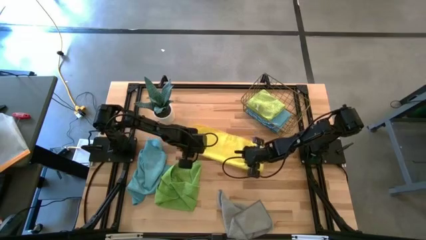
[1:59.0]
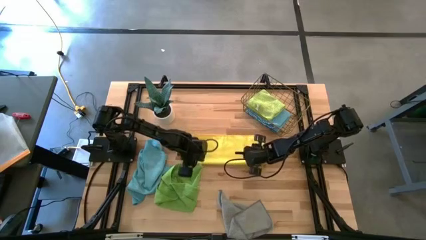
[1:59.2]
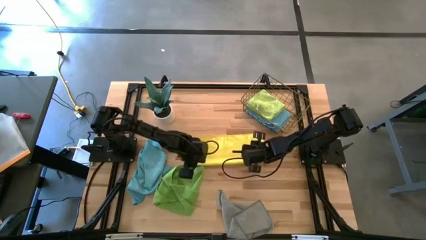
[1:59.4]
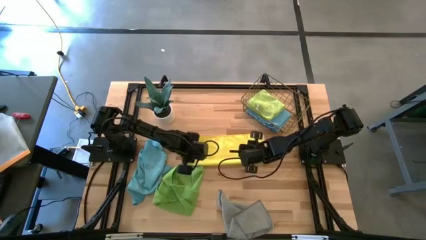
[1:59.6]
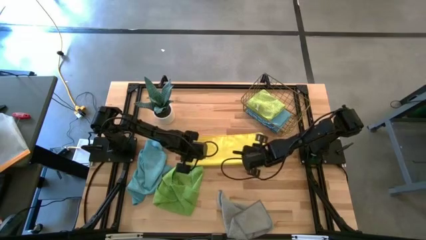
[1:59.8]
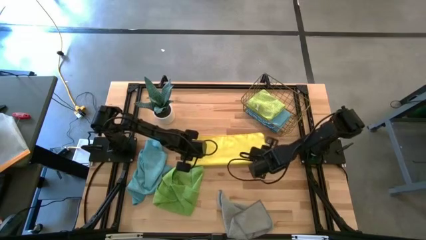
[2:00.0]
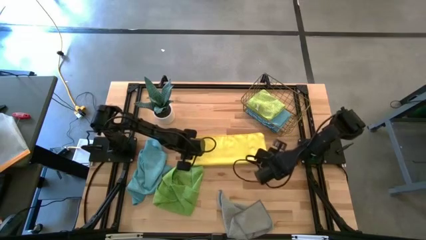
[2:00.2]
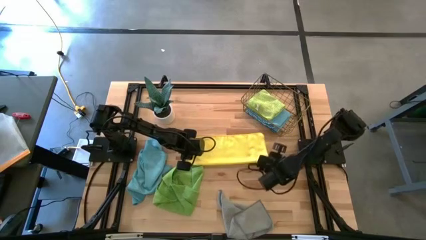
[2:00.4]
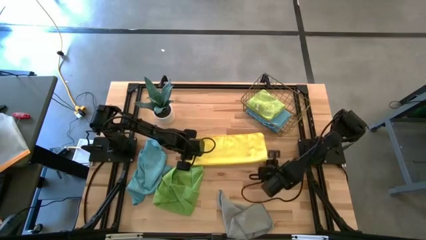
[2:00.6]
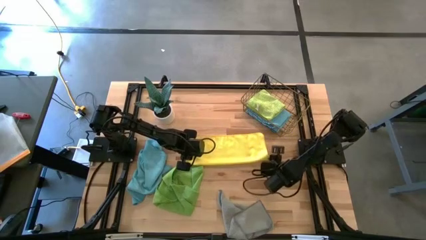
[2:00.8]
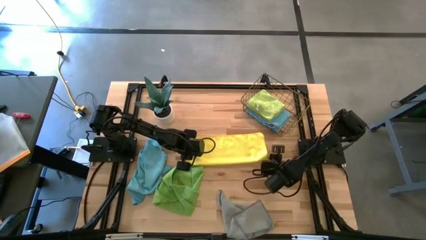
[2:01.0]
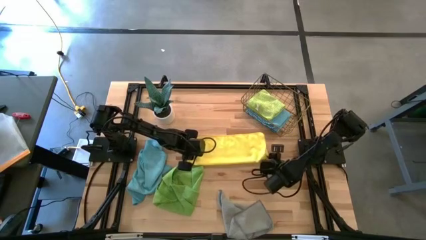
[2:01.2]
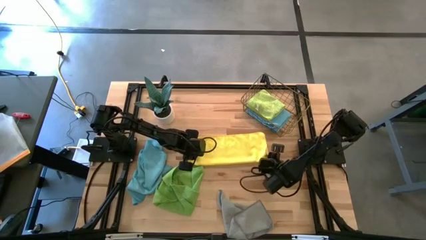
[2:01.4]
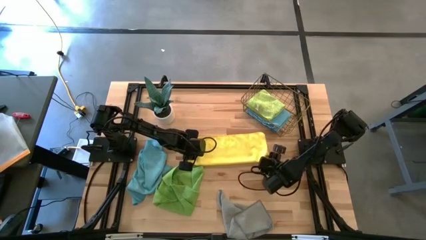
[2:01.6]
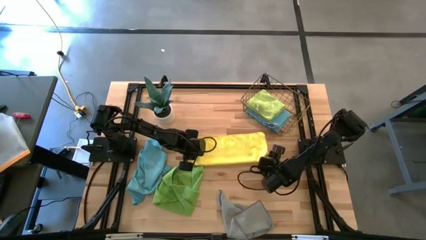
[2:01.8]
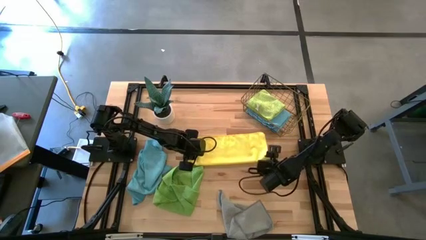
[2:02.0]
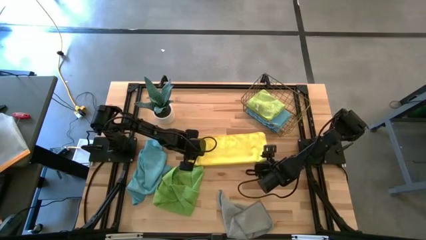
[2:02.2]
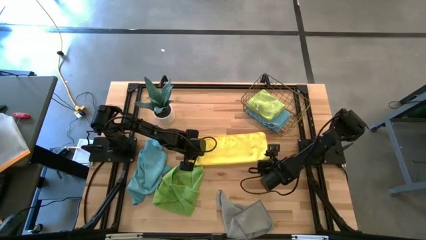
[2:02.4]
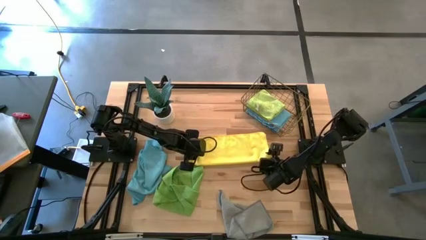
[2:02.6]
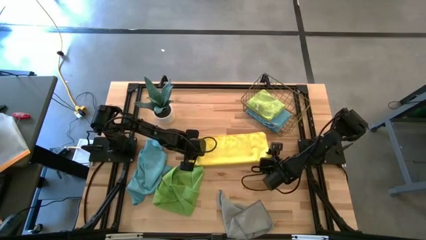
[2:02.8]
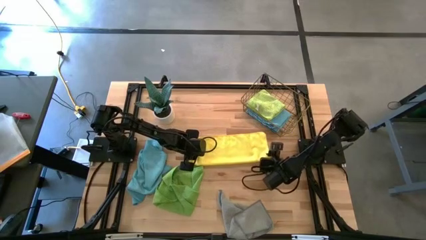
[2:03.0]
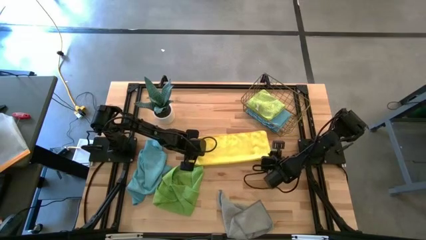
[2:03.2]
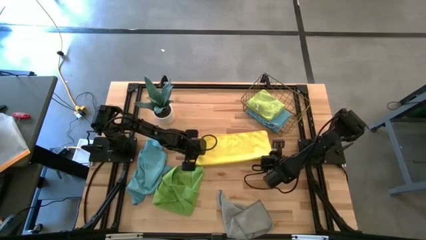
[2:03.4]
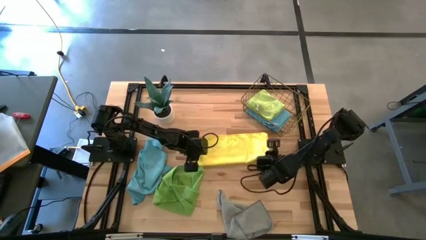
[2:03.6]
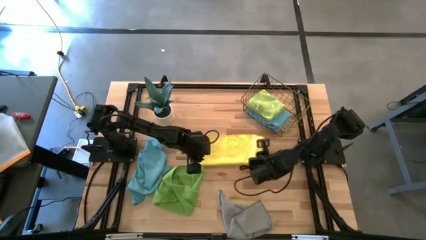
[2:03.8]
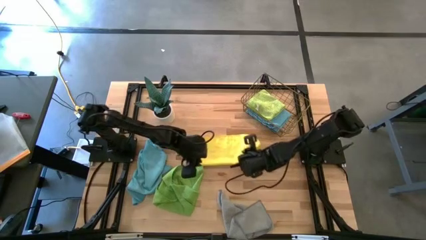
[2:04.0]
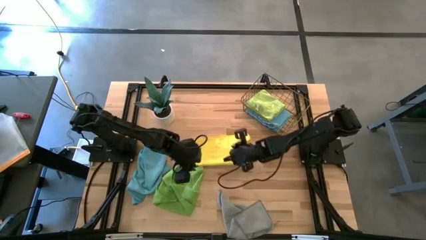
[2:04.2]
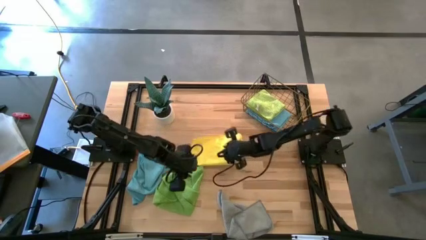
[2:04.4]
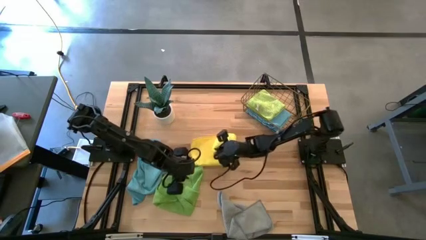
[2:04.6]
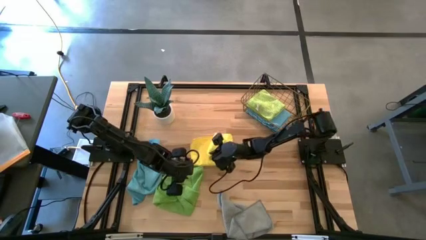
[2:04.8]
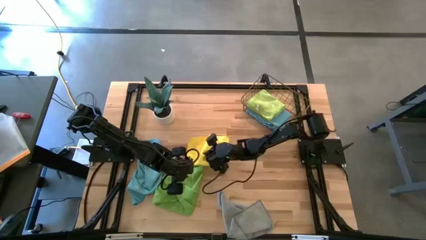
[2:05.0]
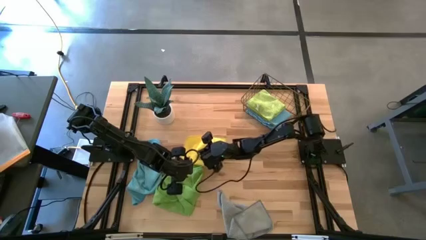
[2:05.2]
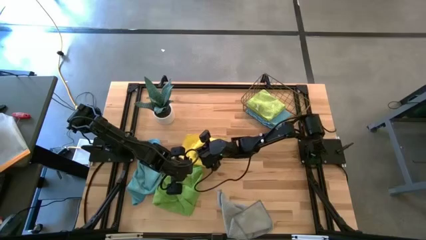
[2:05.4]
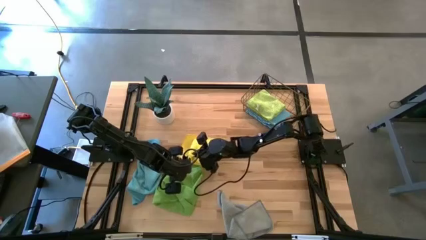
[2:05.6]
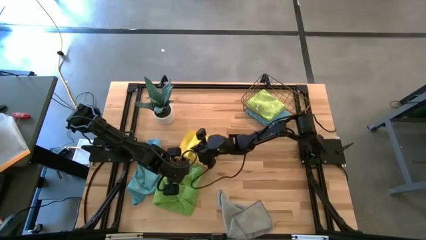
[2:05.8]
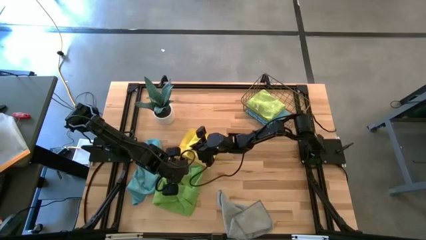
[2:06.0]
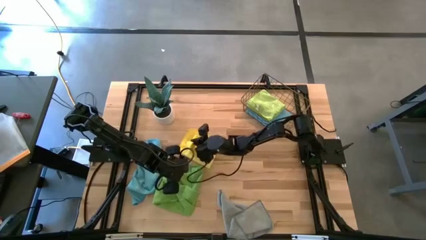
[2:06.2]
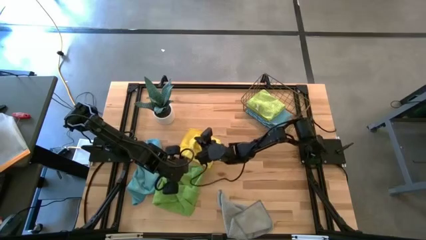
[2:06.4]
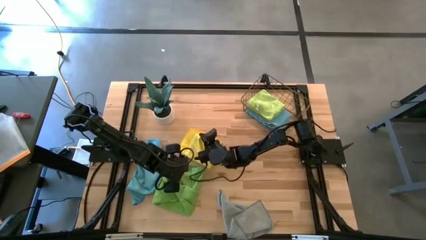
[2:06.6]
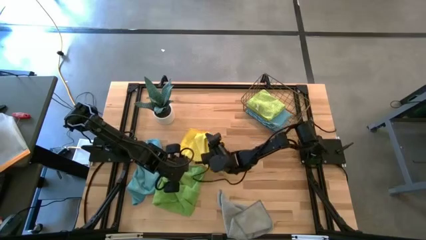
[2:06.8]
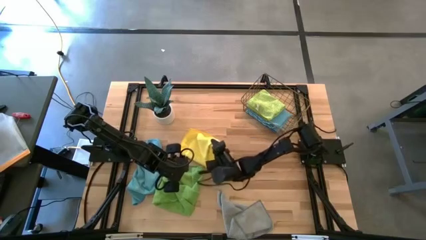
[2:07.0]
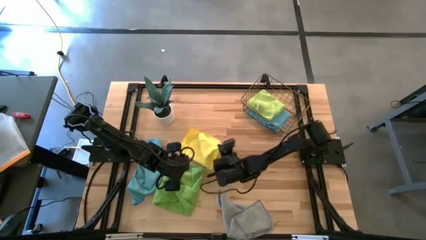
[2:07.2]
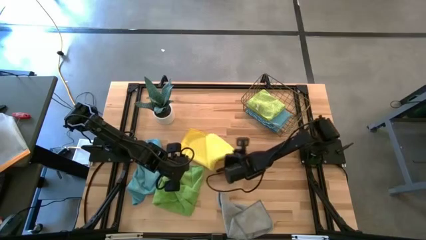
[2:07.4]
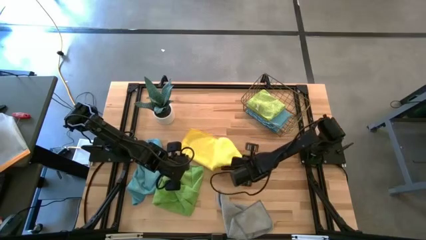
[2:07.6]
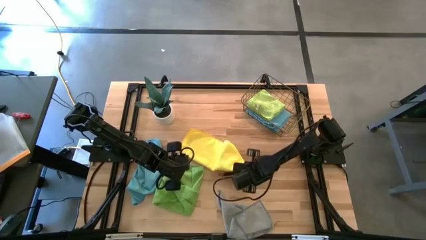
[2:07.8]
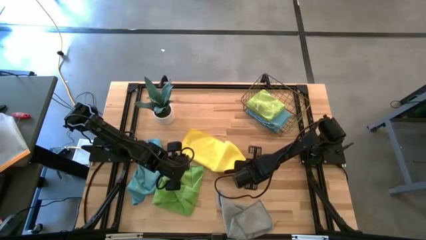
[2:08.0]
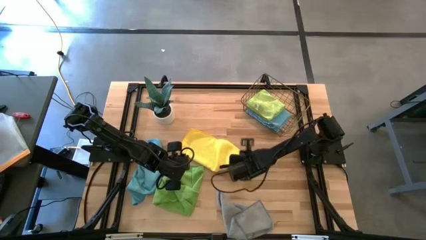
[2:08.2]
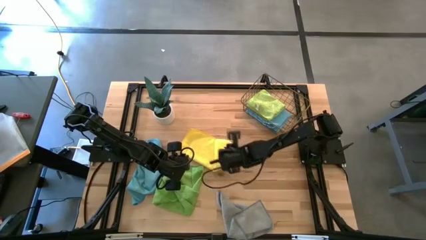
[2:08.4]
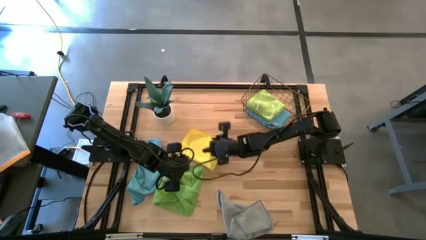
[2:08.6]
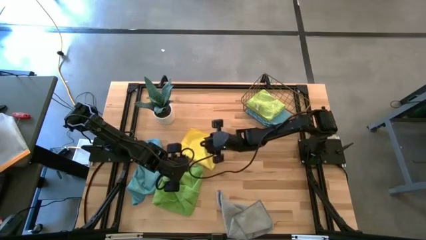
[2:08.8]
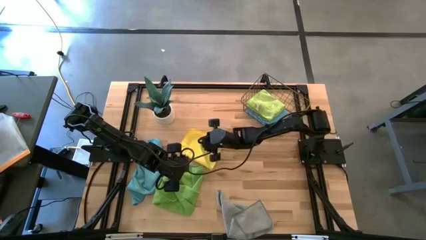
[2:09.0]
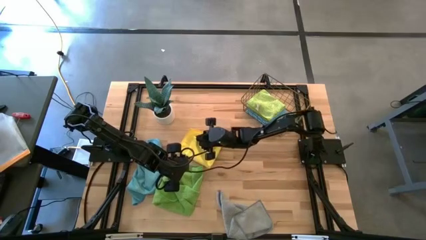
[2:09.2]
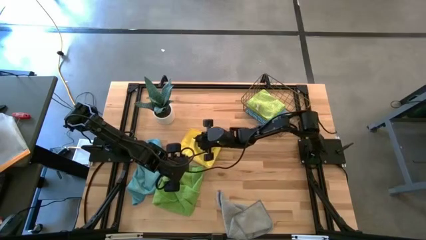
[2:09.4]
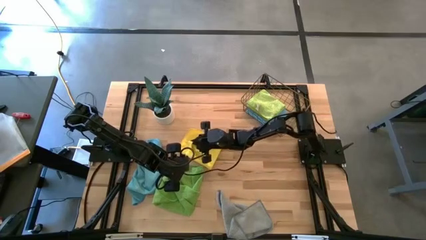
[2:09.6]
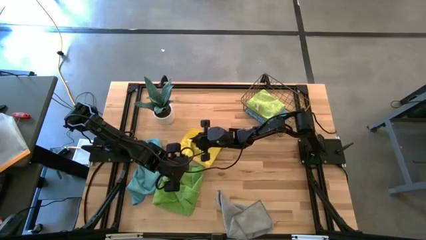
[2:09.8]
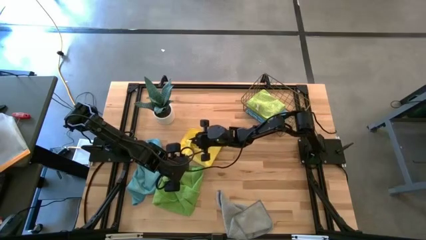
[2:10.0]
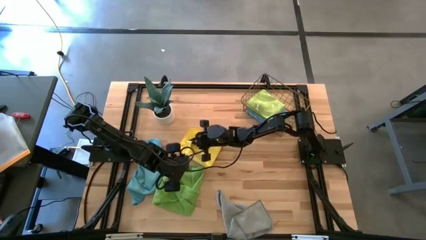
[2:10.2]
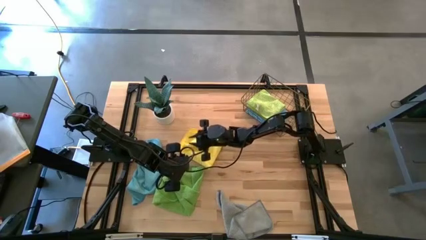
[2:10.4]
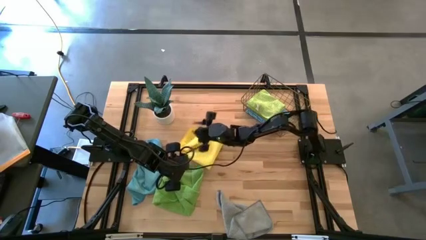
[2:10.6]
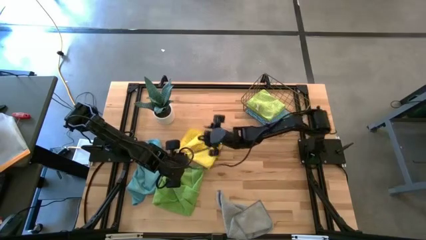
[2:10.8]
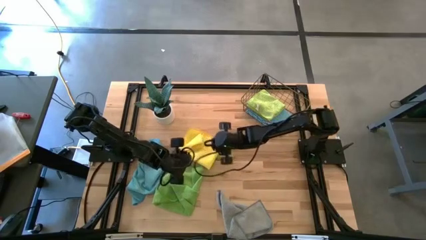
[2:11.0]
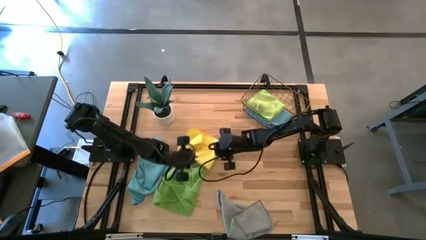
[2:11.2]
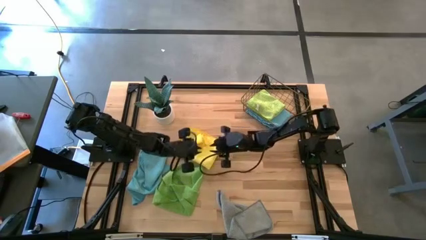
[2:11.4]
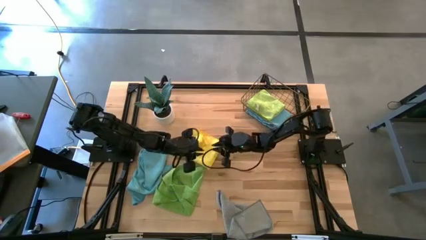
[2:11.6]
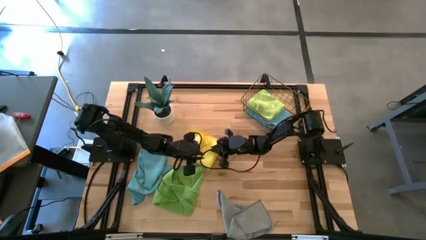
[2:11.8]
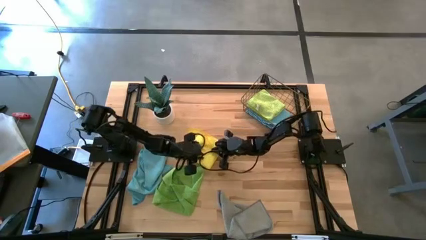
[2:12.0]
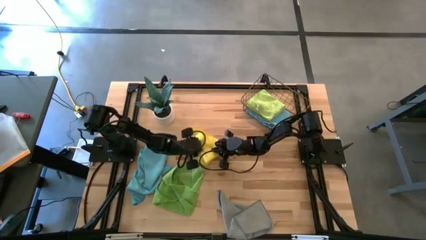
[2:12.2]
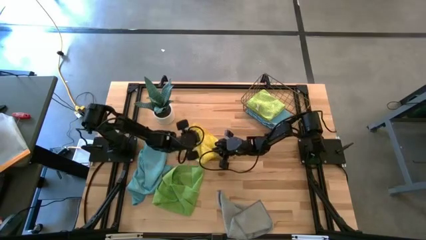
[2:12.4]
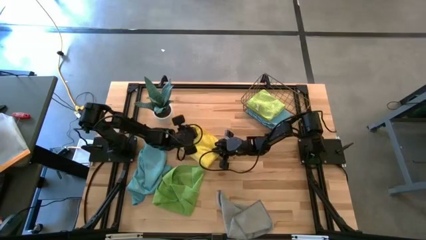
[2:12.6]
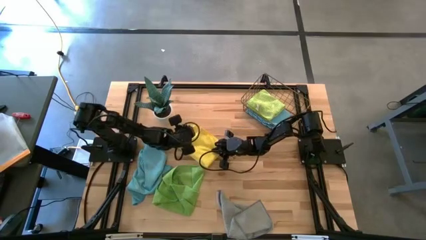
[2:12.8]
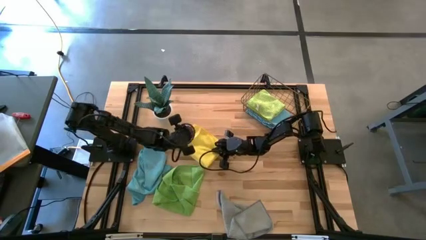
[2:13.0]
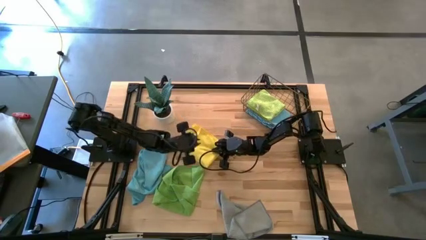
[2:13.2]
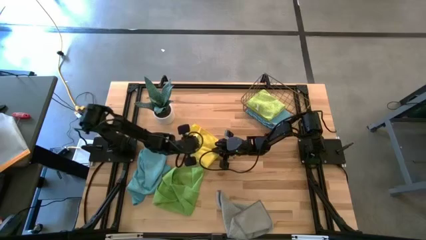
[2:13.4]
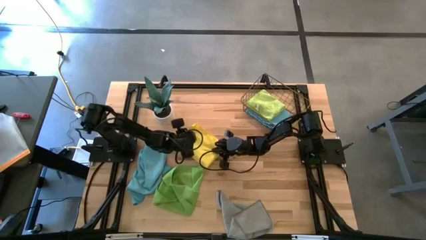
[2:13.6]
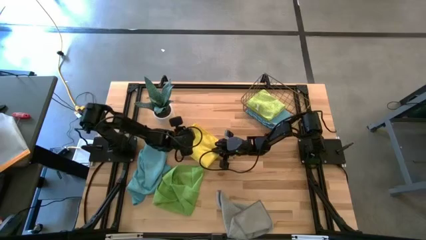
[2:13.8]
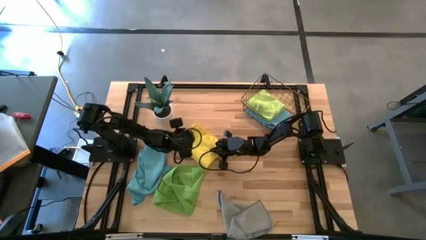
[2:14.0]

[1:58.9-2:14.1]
Task: Fold microfiber towels
Fold the yellow towel
